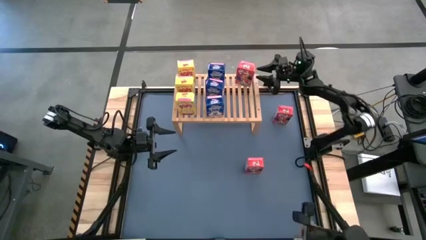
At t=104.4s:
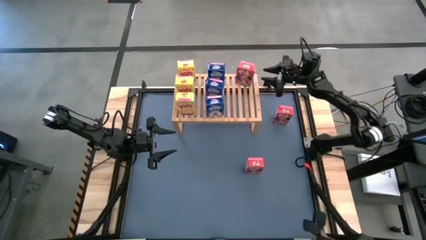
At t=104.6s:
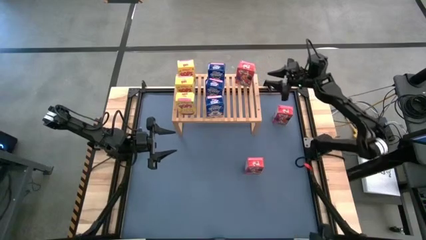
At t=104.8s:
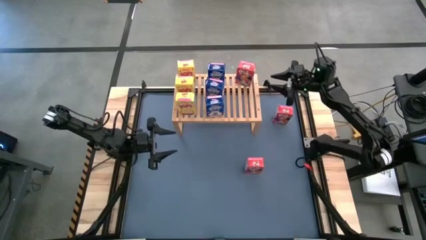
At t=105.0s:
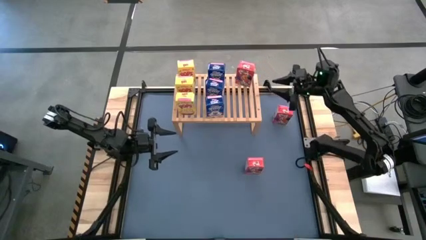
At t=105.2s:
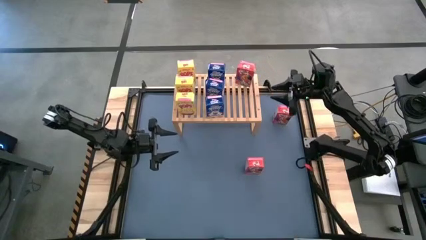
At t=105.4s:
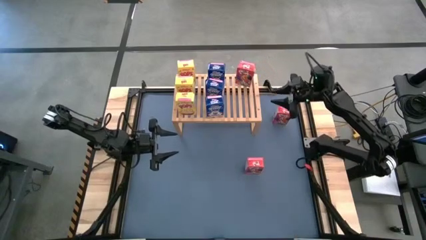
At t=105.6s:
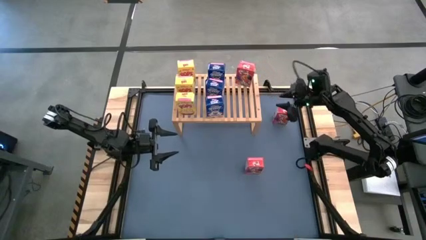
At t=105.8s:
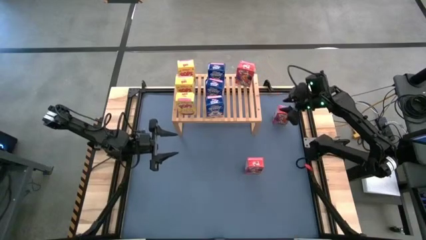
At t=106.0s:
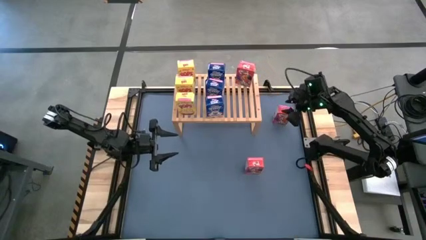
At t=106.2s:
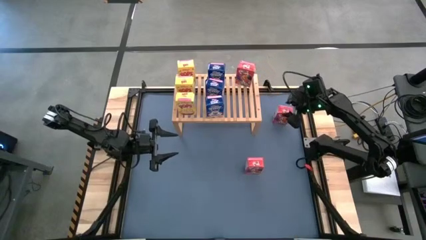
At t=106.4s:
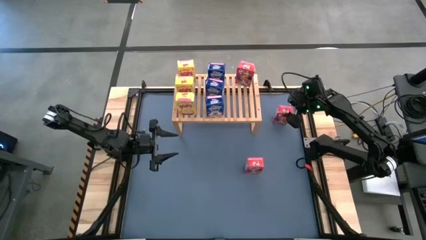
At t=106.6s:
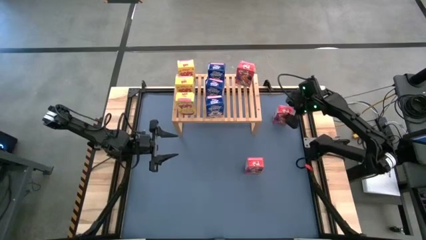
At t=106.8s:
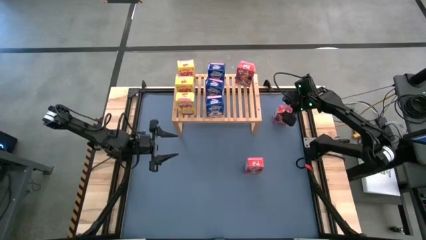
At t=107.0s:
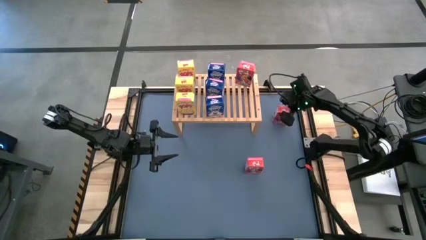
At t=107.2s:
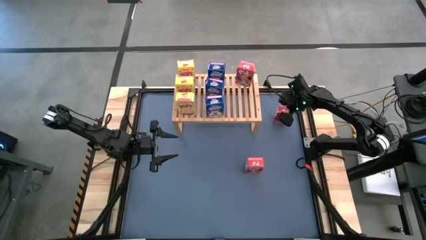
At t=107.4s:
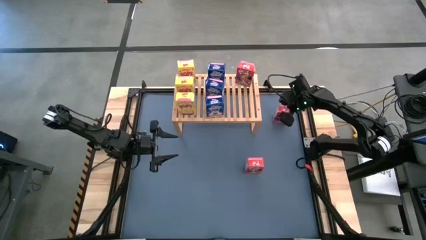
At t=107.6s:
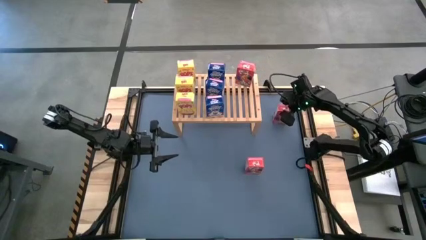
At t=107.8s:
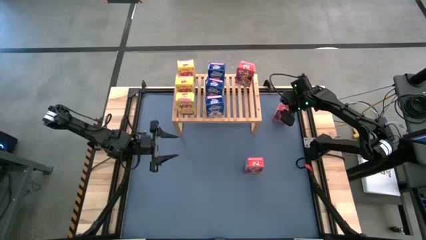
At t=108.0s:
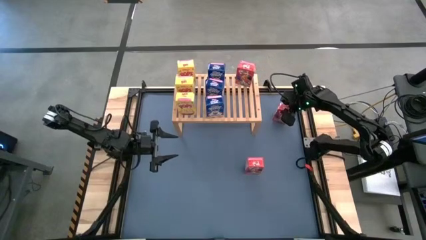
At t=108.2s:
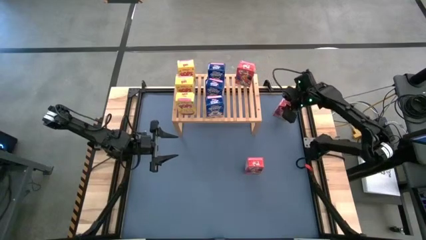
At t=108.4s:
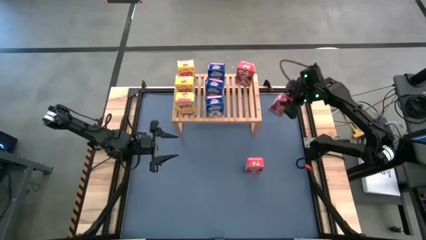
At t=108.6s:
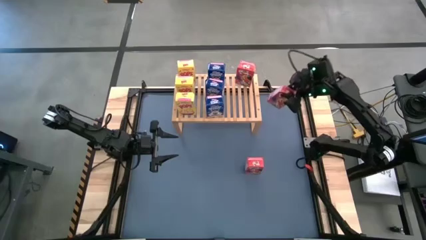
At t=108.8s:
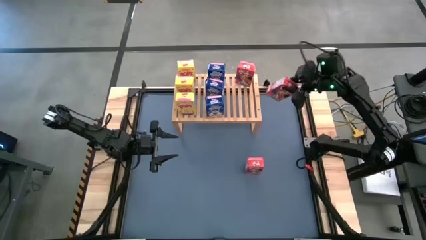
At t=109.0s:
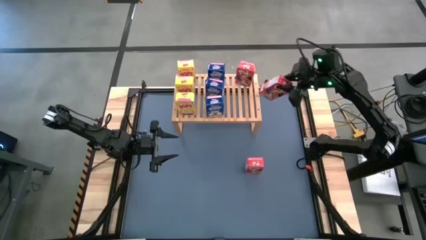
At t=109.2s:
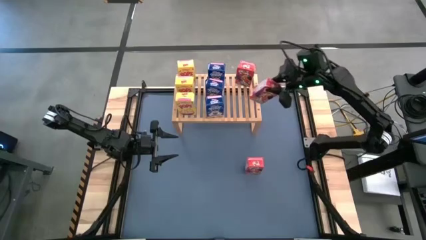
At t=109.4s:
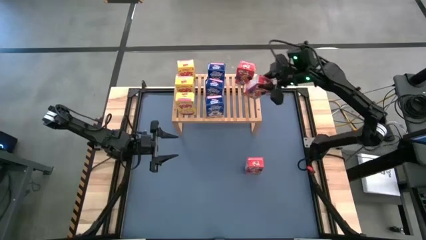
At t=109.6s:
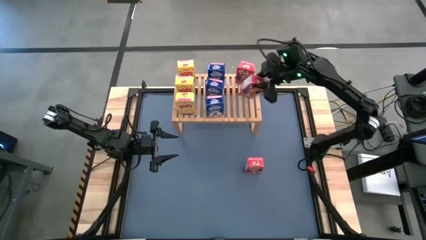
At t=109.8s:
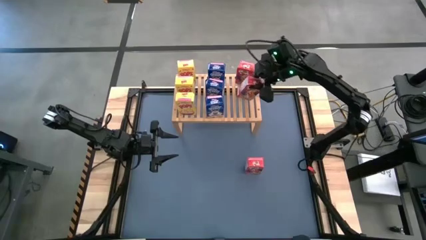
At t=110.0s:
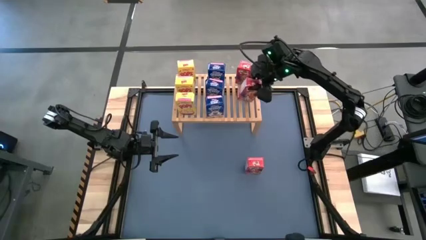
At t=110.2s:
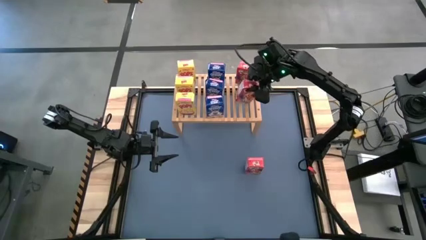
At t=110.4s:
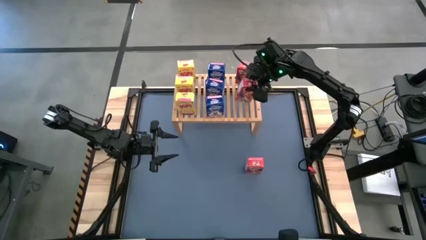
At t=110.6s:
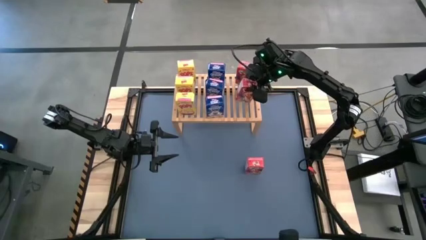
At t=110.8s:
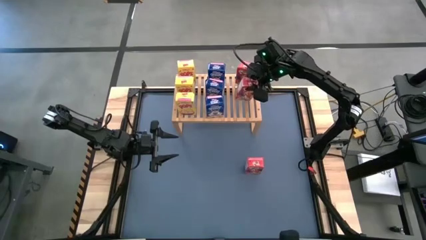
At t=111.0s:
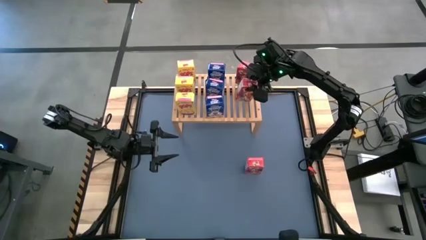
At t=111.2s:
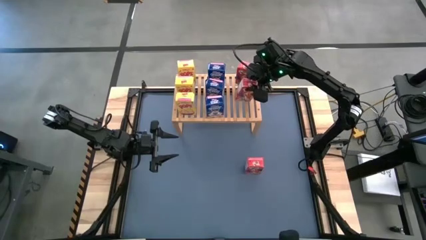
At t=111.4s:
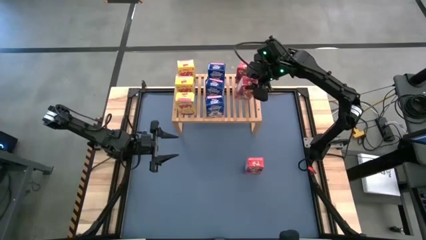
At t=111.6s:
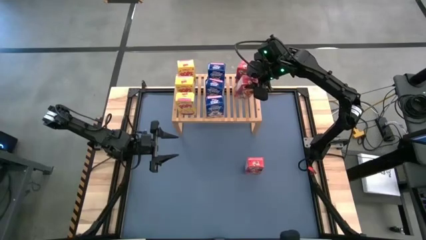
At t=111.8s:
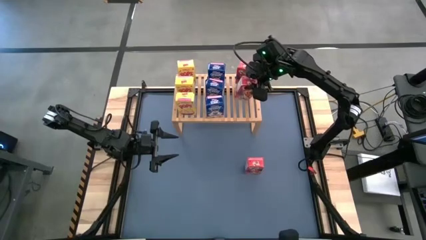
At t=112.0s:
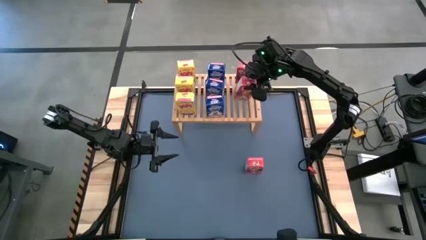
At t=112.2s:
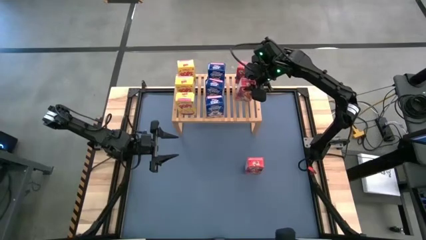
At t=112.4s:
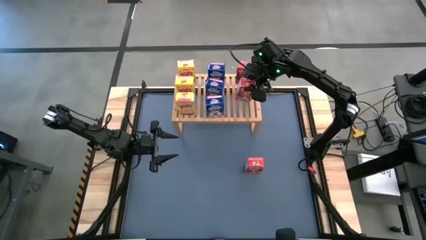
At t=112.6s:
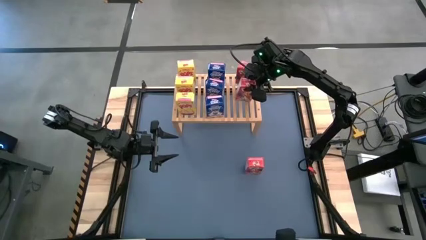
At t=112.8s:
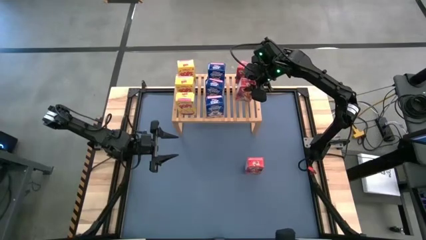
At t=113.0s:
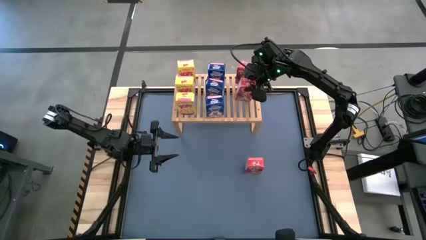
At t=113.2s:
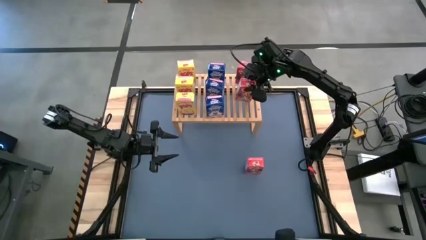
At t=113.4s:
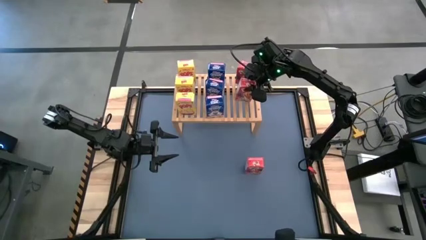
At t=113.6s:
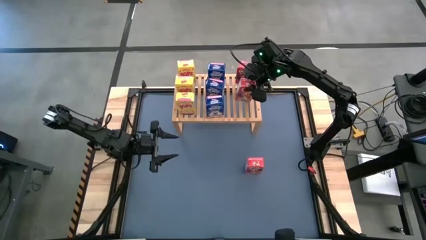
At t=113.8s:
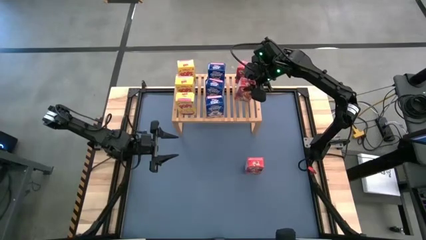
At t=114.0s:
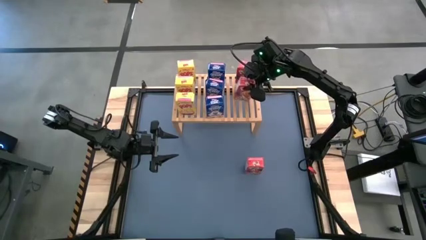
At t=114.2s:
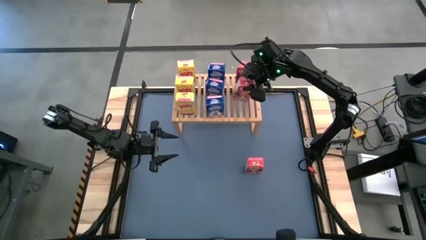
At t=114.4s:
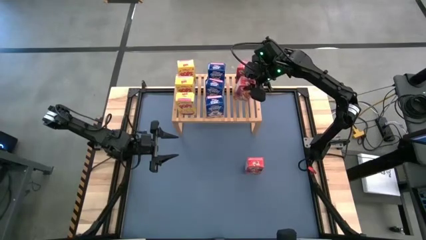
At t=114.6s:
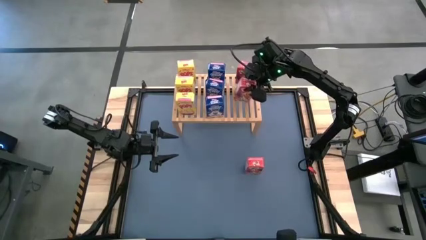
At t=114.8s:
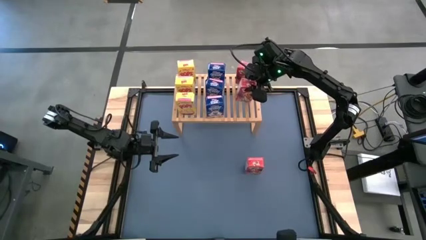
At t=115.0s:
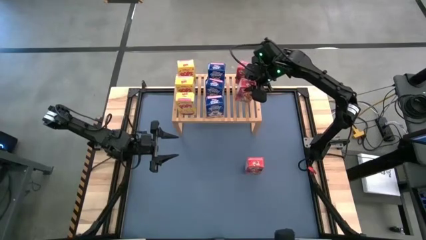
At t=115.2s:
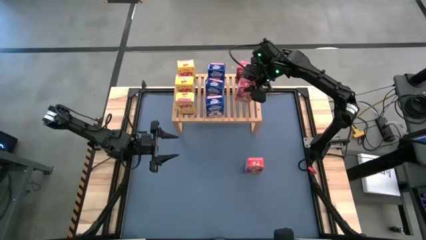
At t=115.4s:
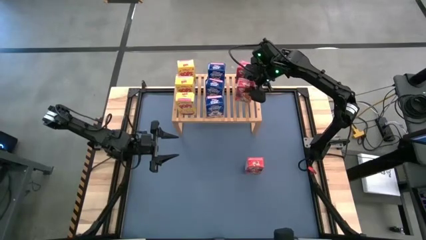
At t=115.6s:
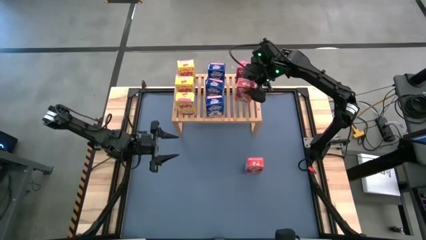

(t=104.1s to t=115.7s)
Task: Stack cereal on shelf
Put the top red cereal box on the shelf aligned with the other red cereal box

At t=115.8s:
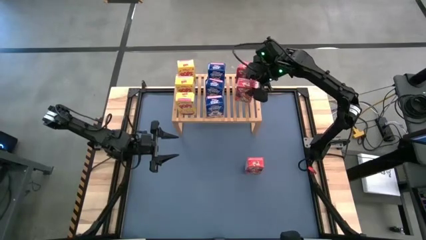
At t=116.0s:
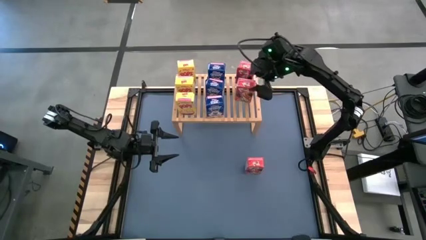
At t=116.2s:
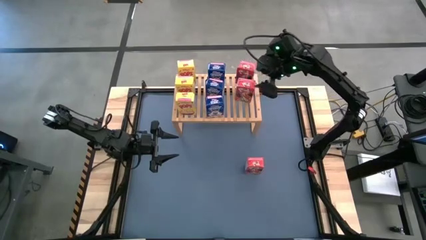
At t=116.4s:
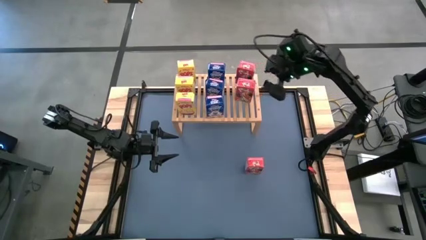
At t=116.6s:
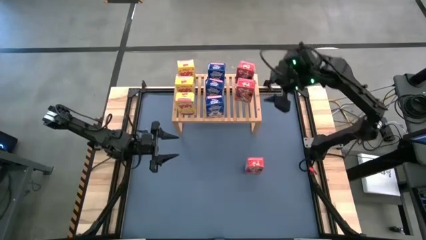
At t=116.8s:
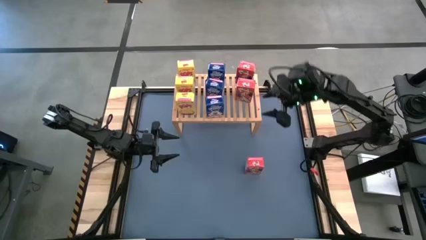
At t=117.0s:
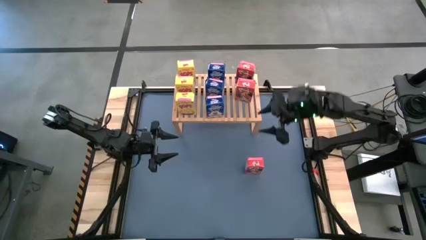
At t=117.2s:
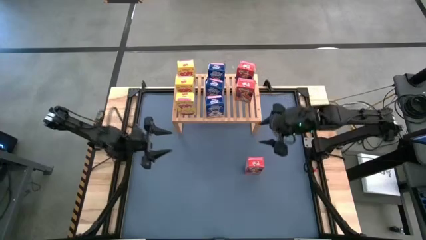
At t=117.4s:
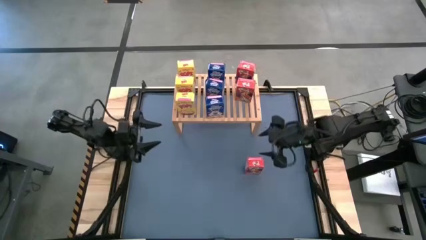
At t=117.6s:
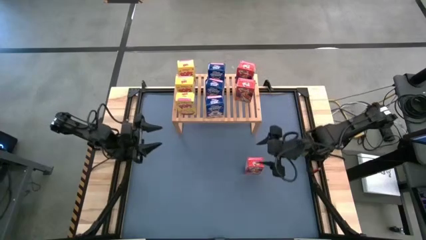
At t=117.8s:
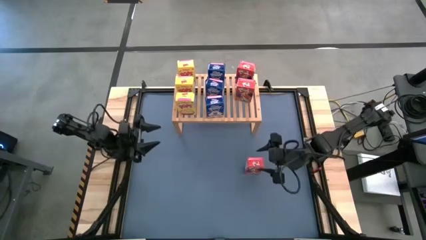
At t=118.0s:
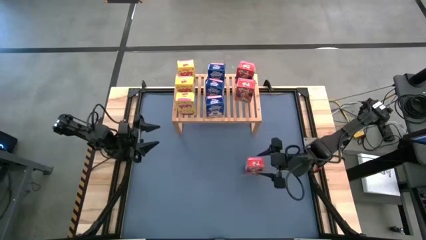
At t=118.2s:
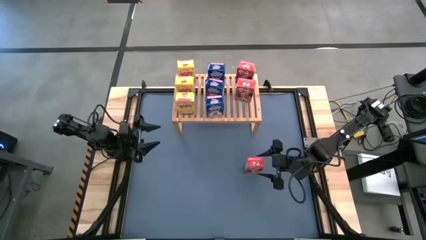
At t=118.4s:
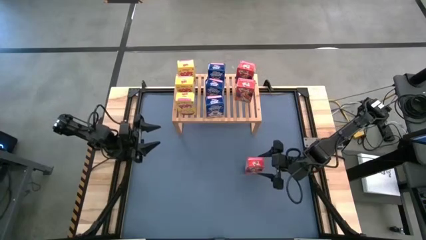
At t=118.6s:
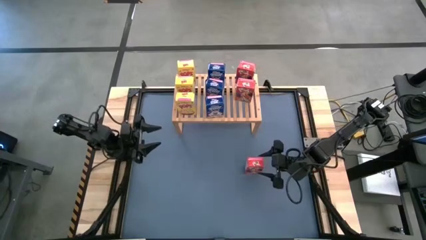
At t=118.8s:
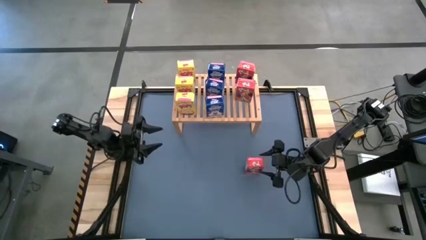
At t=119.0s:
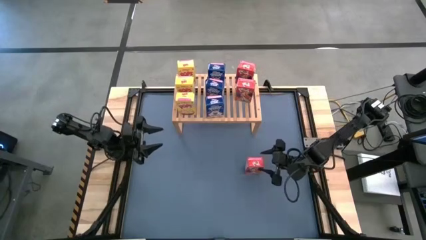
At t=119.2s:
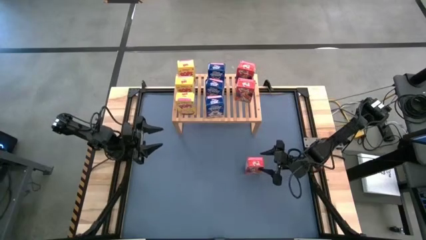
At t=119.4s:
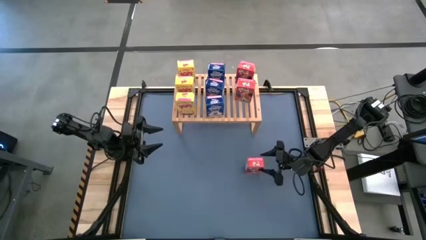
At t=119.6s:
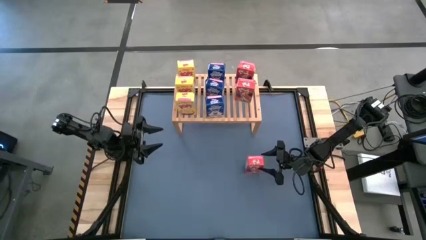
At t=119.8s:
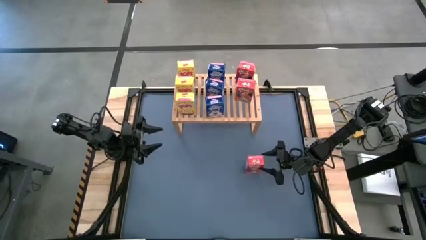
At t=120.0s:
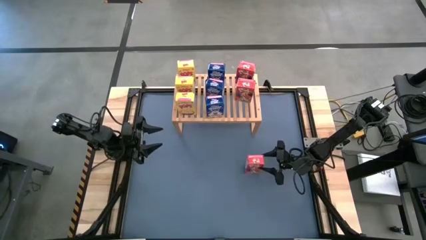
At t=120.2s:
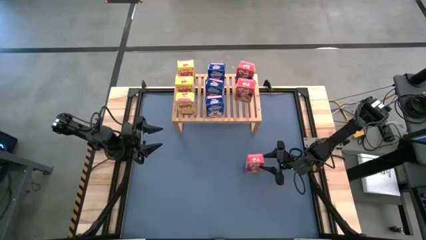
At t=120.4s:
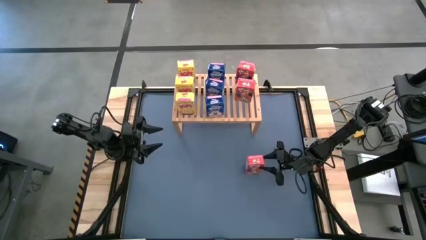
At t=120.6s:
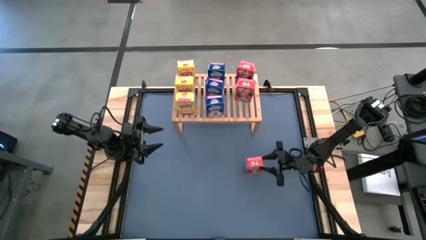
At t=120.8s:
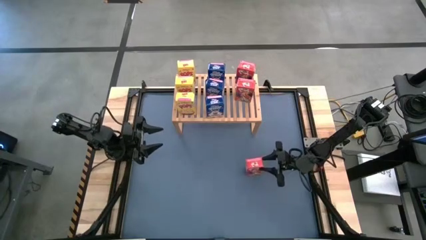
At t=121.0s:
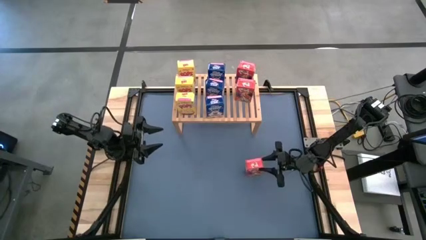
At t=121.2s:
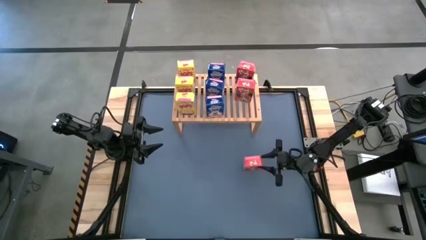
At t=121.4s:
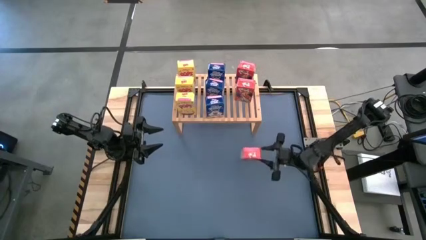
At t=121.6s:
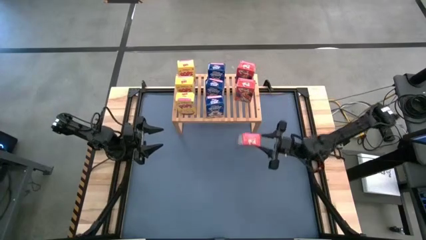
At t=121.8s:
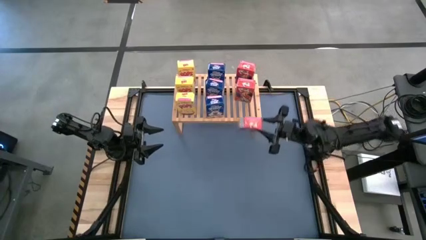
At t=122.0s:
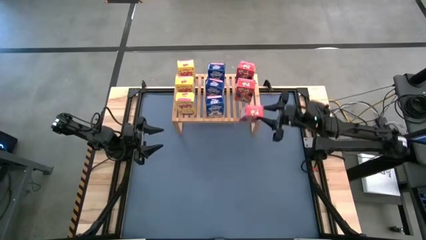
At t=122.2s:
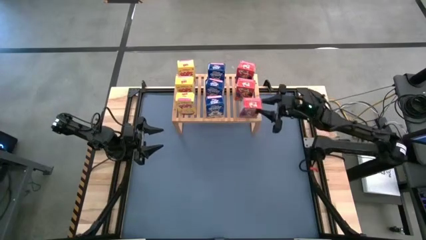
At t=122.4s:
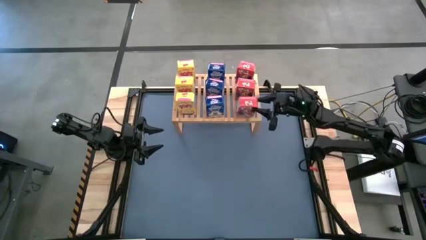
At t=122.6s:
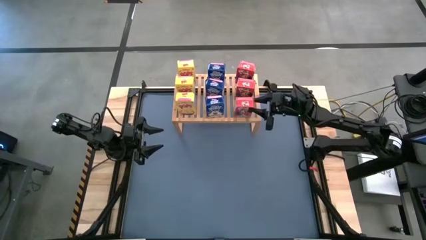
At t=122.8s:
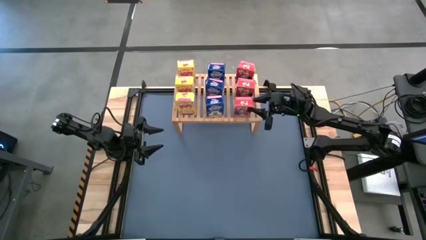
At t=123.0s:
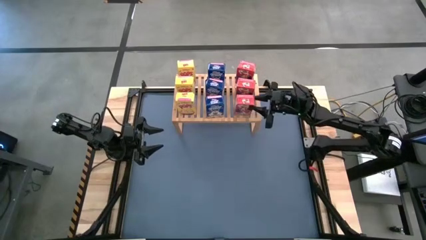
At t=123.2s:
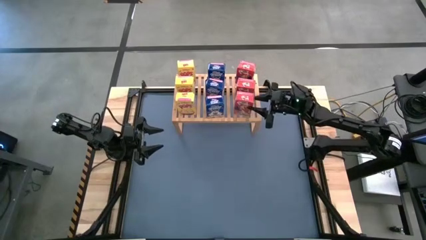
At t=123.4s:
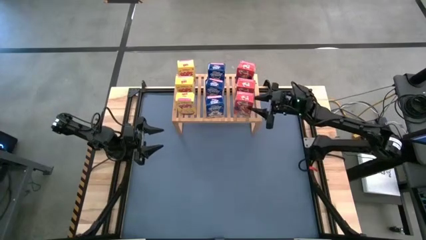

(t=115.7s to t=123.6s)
Put the red cereal box on the shelf aligned with the other red cereal boxes
